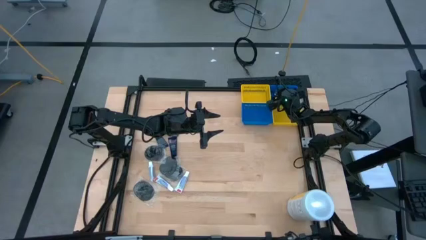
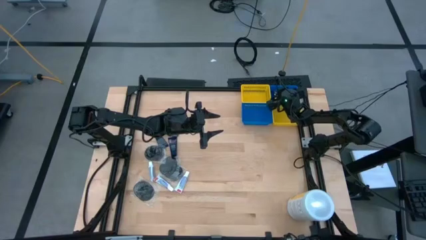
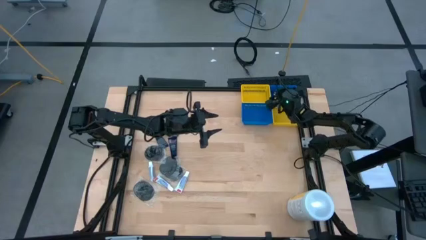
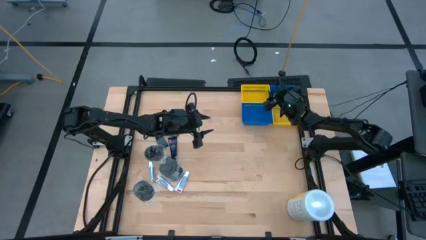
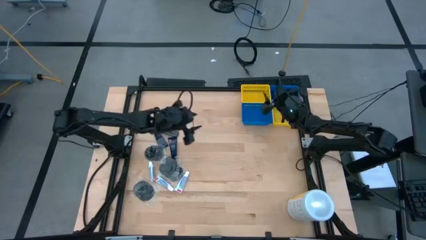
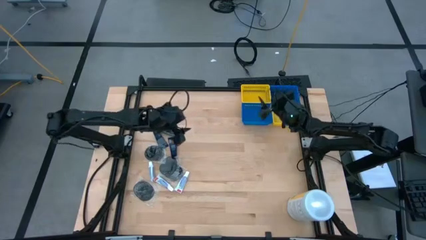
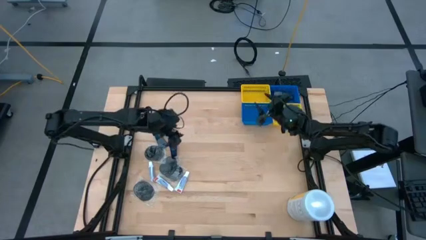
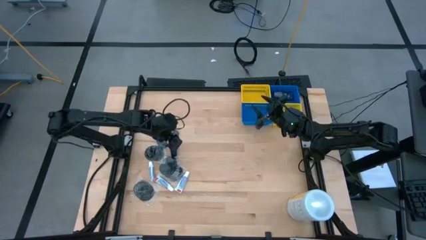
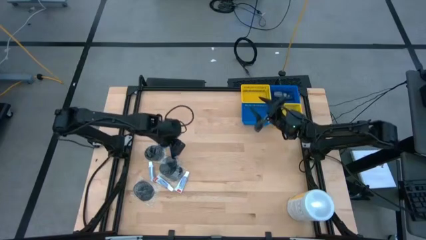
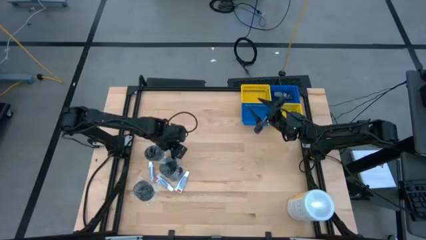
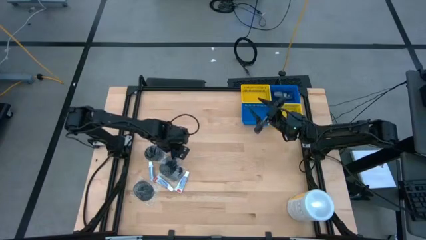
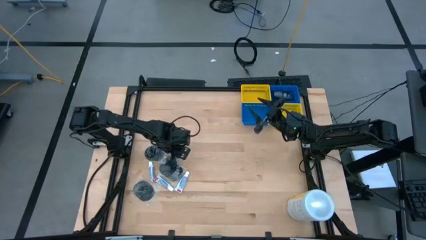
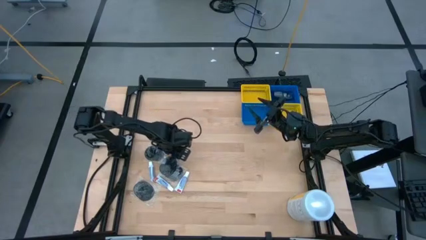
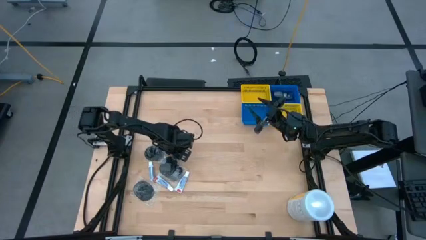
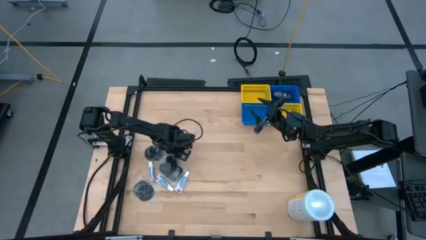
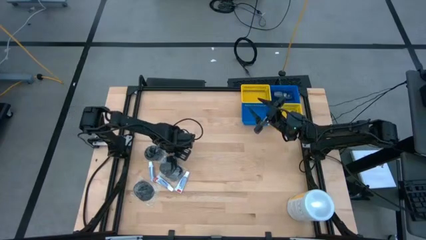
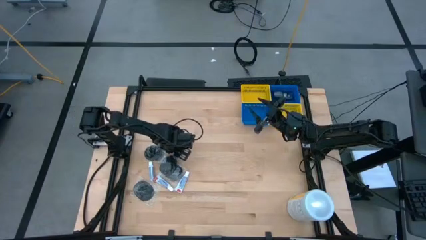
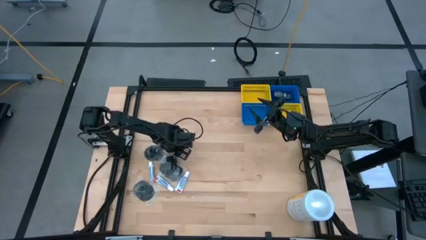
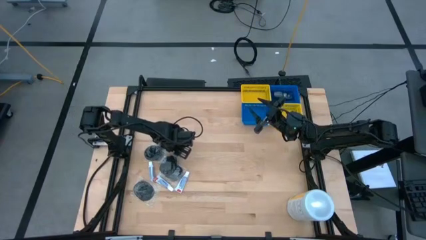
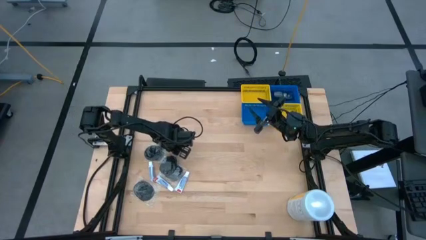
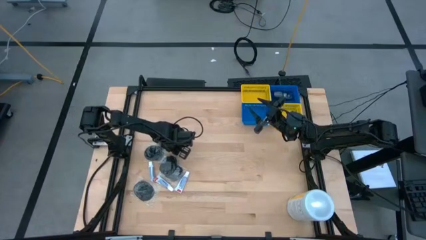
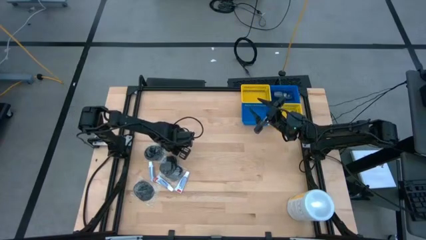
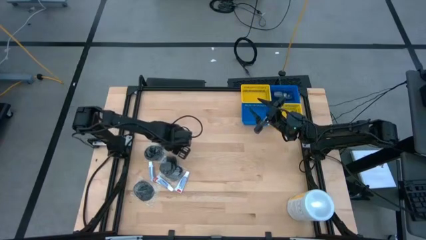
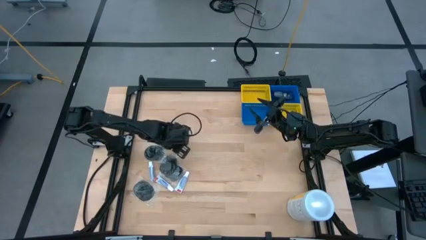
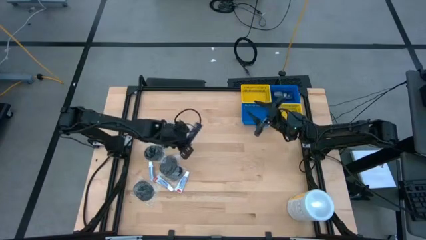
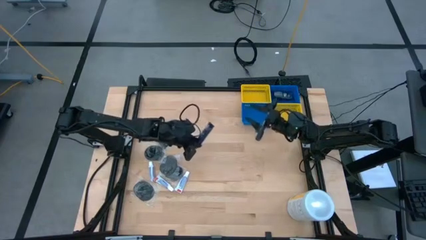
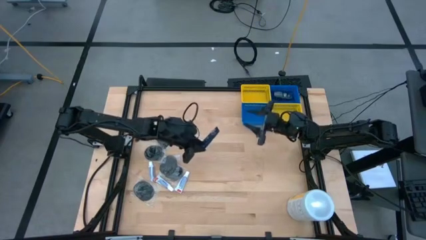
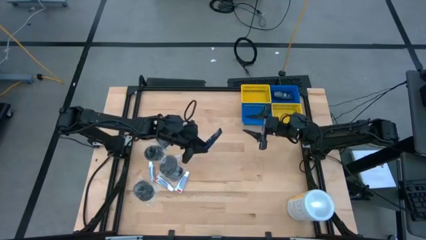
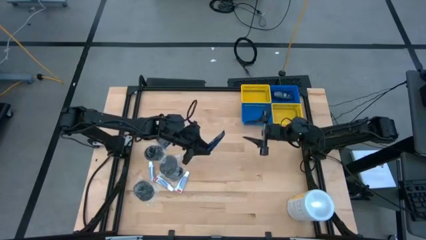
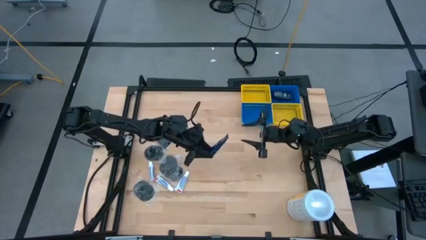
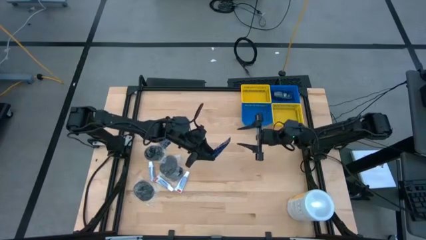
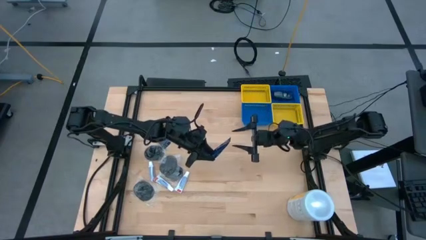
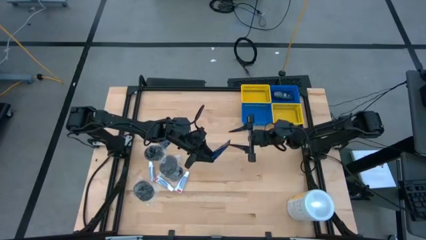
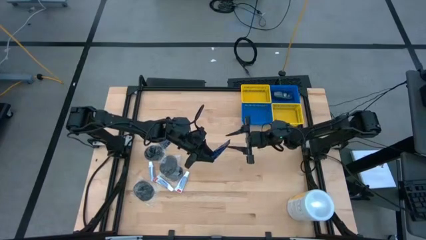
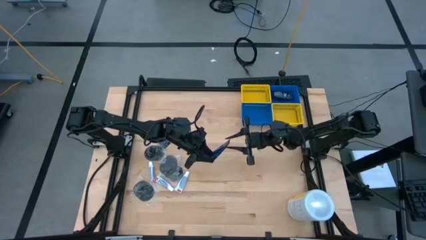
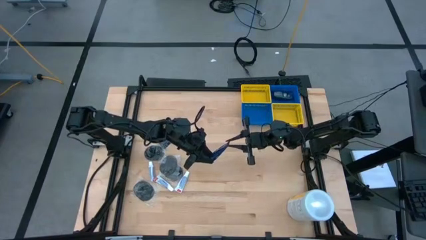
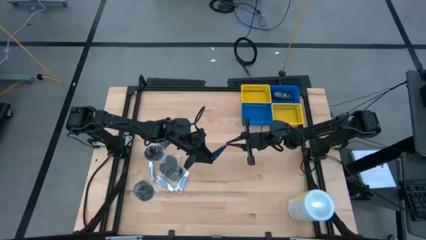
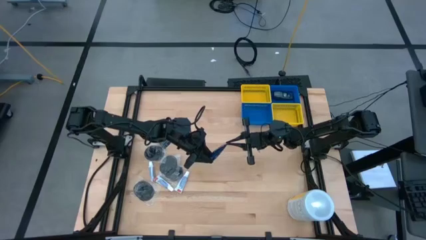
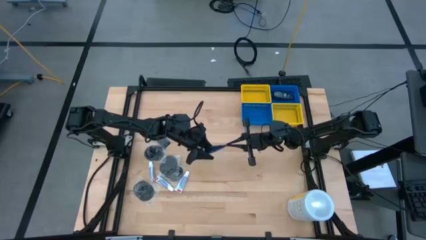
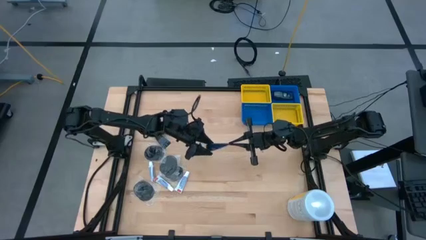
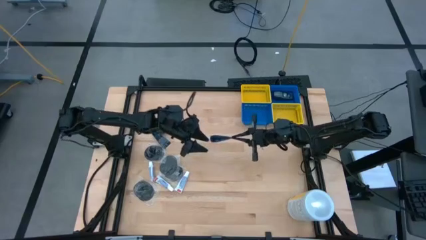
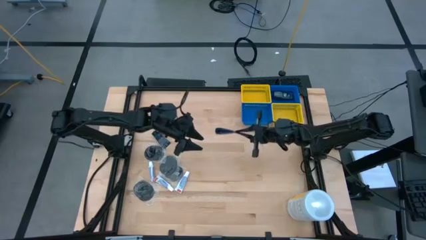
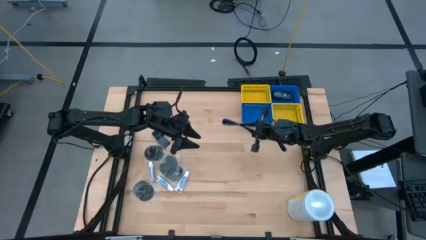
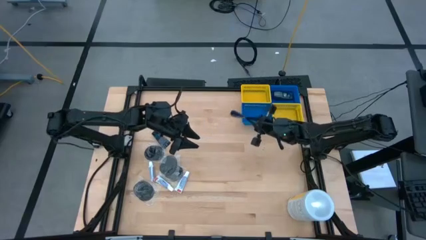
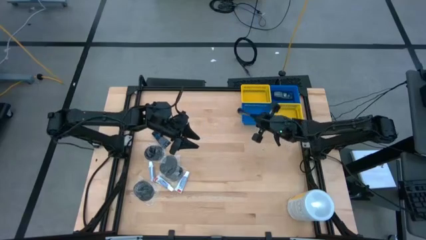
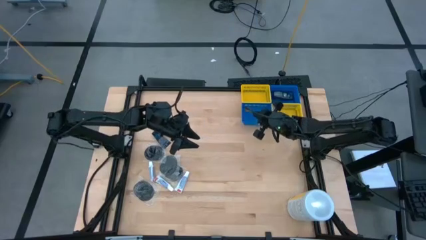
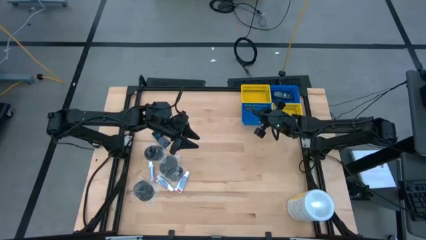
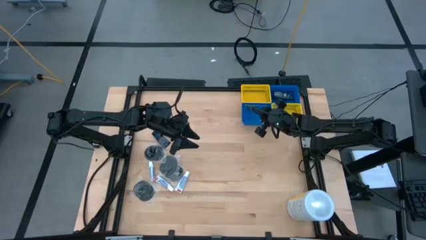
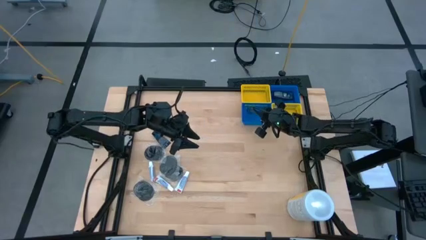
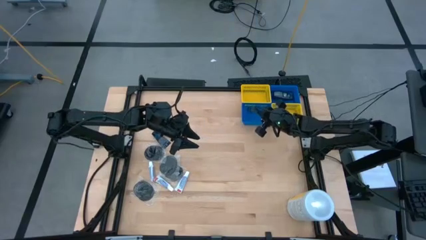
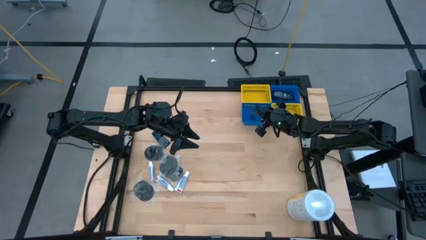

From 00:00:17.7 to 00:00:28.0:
Task: Pick & Place Travel size toiletries
Put the bottom blue shave cream into the bottom blue basket

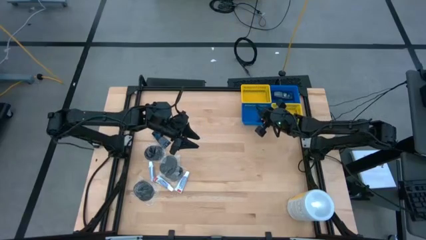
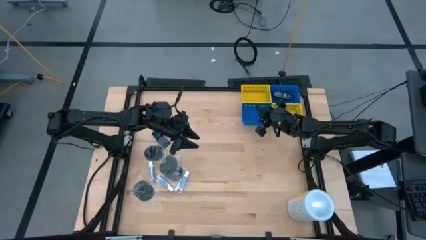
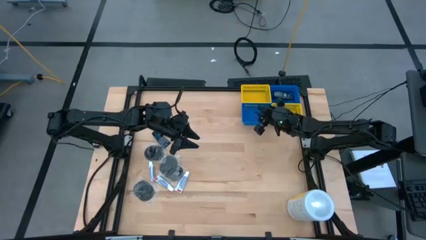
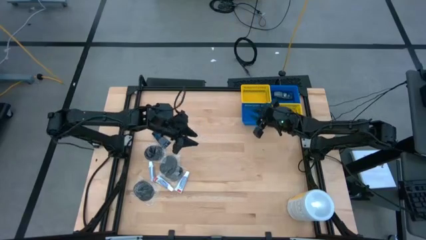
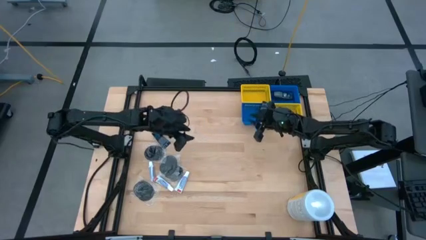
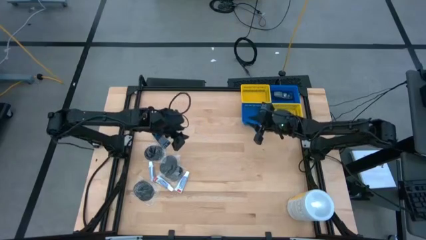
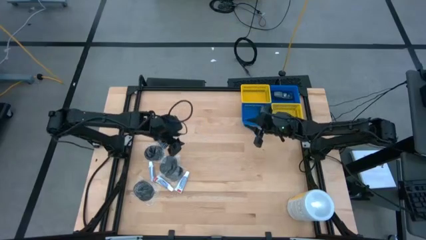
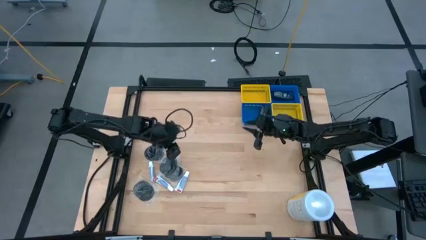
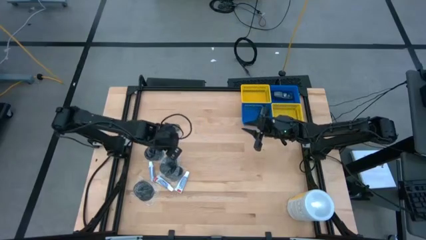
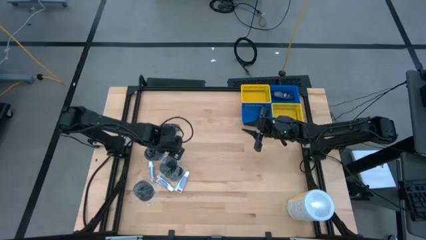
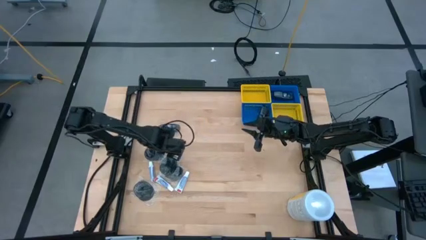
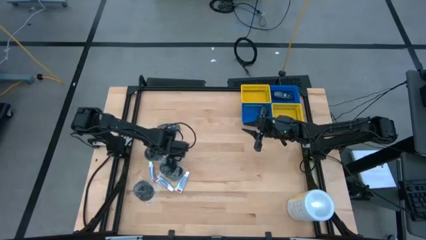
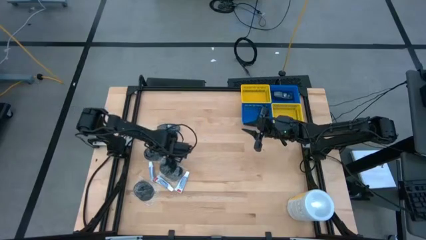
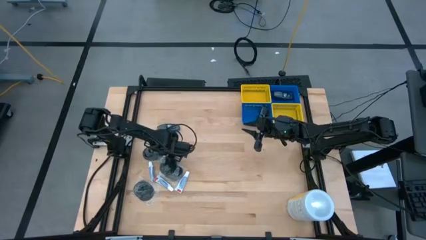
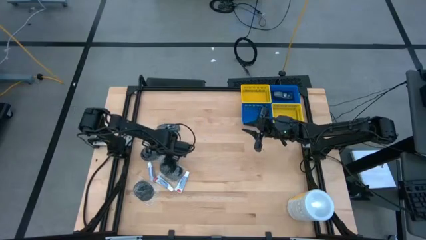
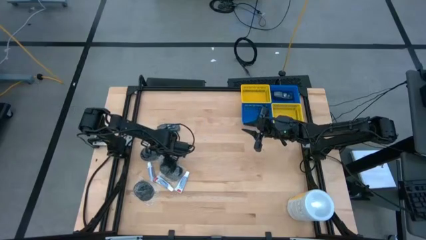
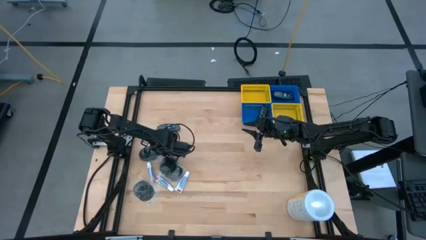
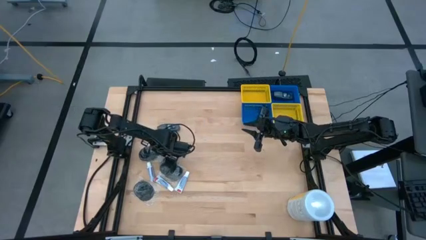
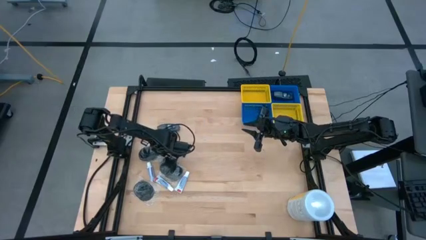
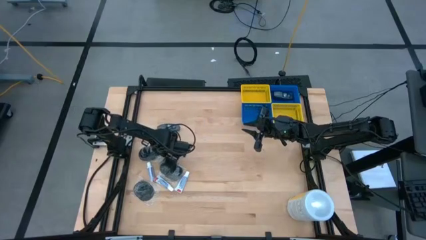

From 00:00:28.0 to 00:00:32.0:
Put the black hairbrush into the bottom yellow basket
